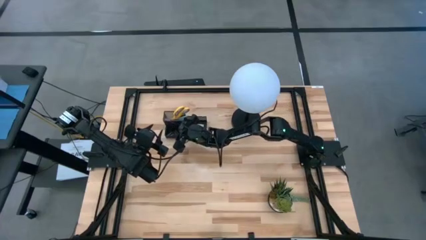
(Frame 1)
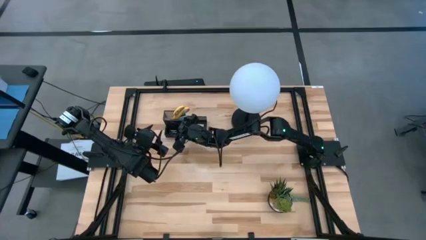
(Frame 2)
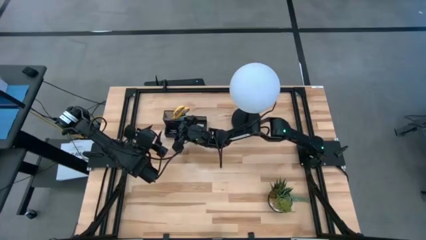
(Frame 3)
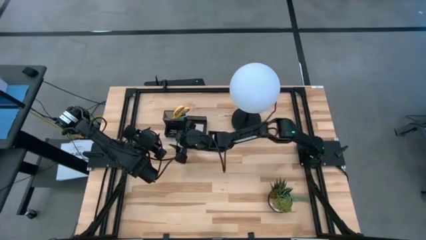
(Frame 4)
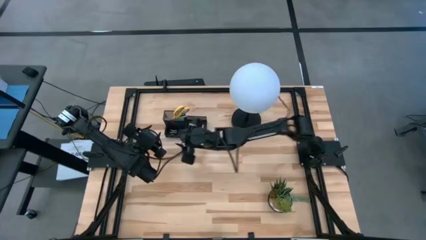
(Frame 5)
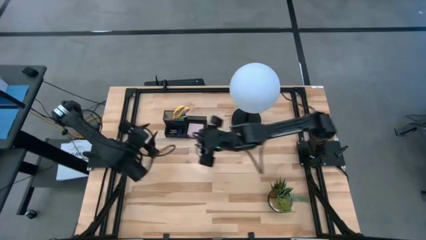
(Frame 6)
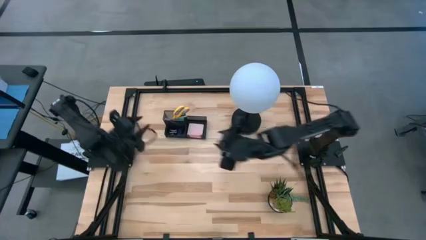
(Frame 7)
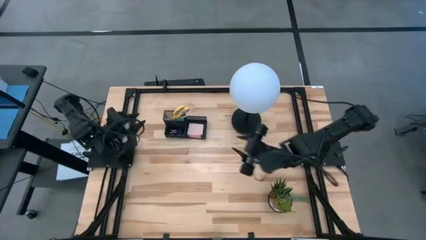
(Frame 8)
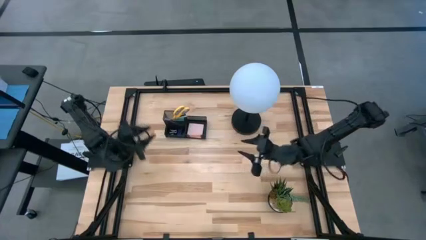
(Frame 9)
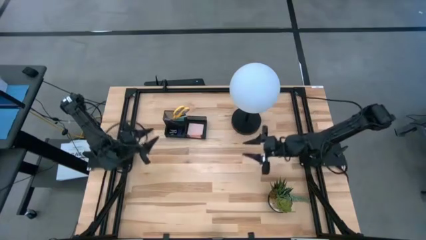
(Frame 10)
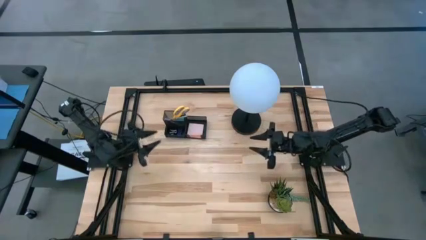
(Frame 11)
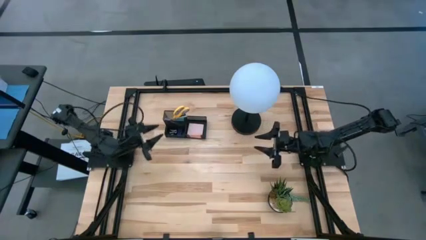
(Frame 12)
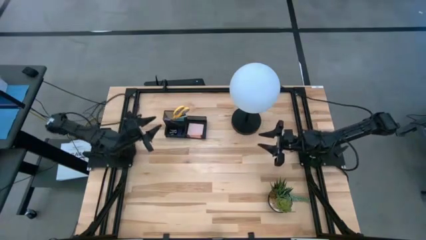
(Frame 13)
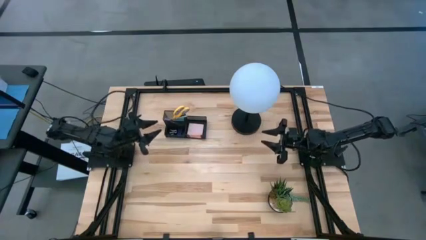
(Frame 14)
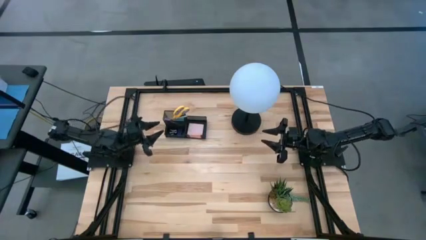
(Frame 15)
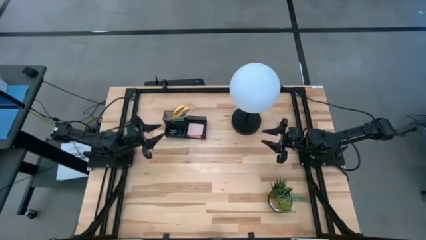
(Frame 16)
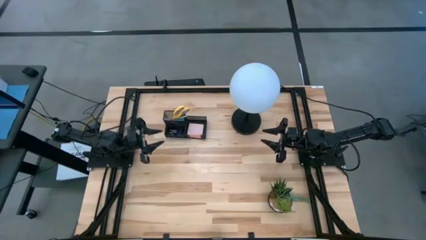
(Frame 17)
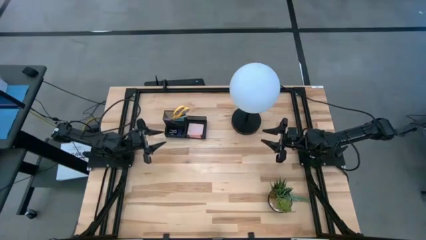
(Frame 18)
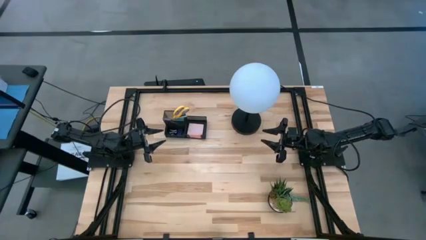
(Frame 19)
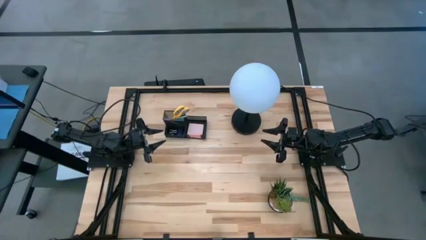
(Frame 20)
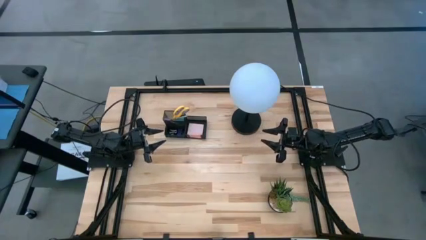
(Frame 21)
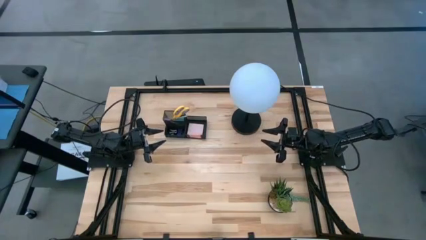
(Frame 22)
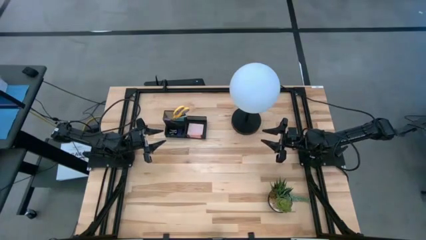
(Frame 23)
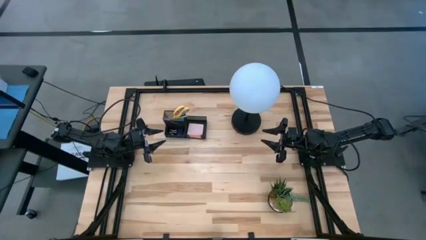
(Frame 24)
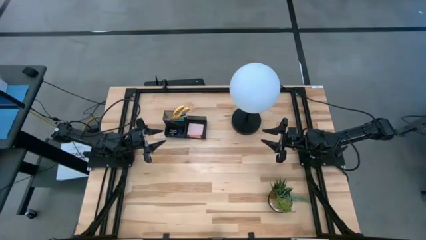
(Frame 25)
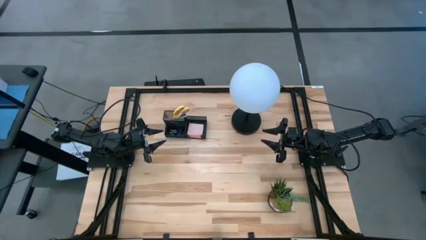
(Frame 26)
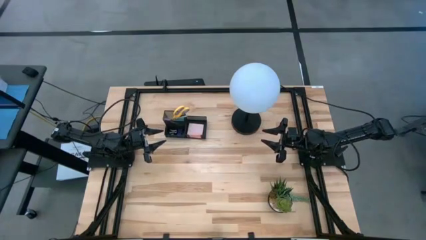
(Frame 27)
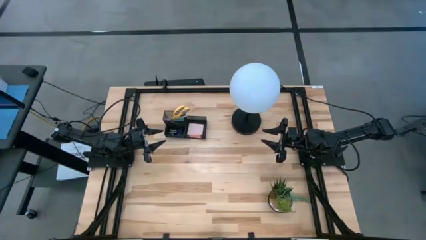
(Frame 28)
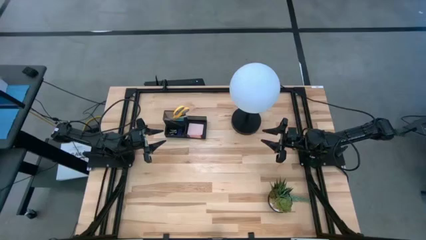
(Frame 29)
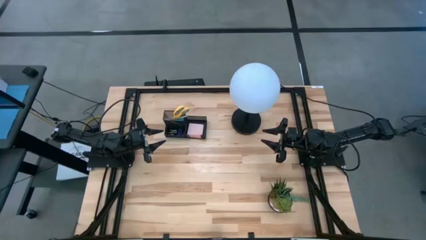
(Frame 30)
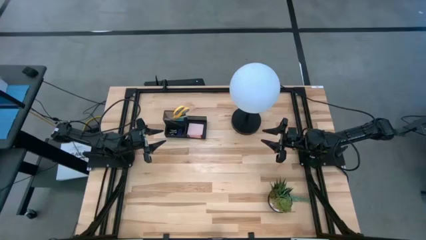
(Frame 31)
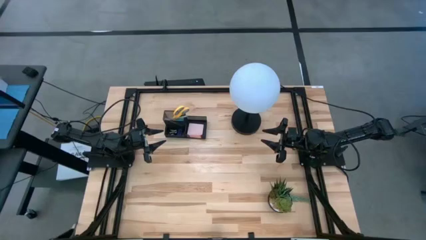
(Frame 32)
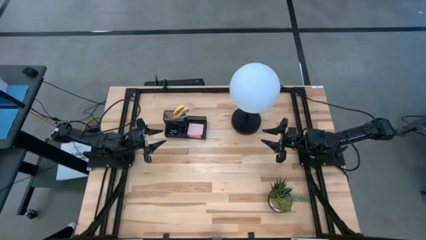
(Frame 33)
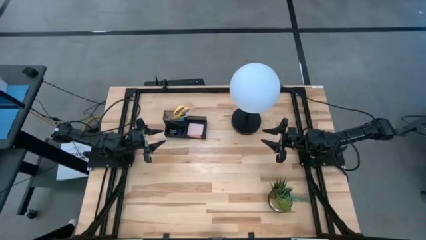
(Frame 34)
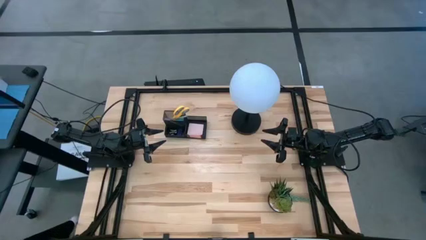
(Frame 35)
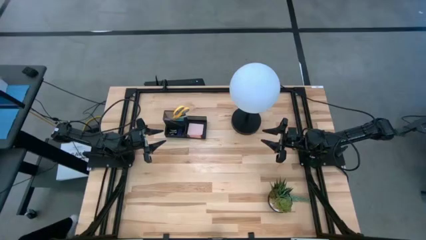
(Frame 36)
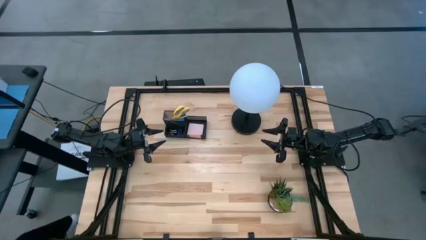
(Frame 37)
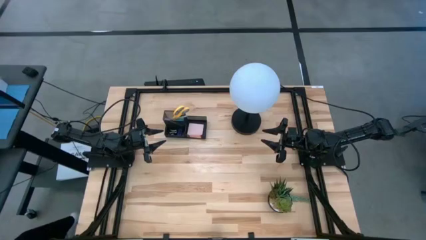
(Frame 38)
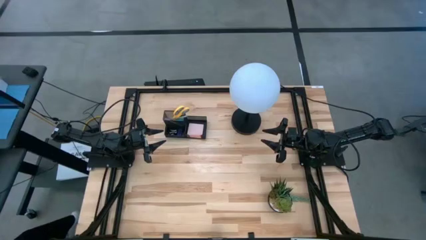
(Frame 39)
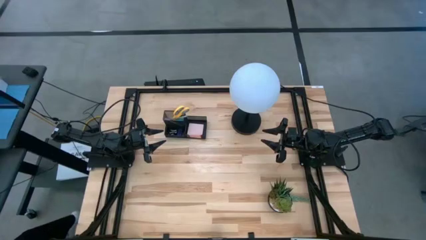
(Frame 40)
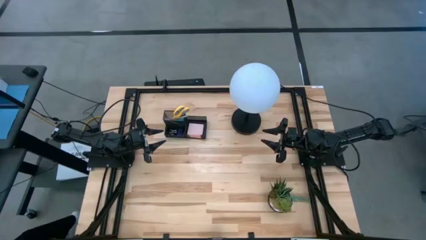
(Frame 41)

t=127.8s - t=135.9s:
Task: Pick and place office supplies into organizer
Return to Home Position

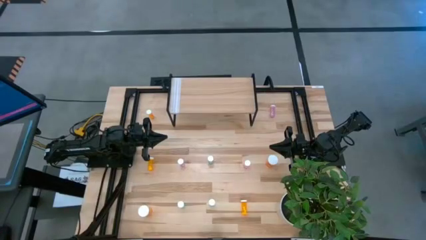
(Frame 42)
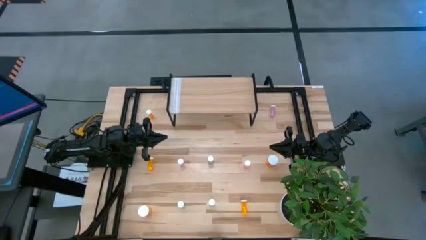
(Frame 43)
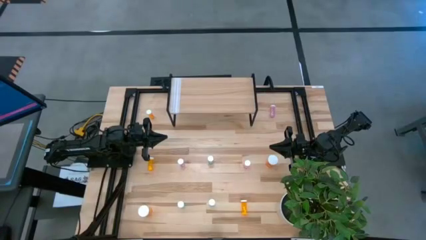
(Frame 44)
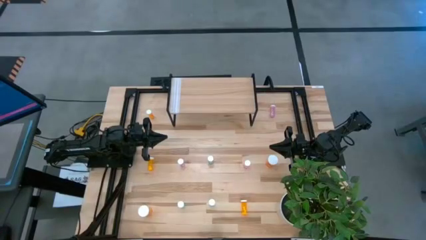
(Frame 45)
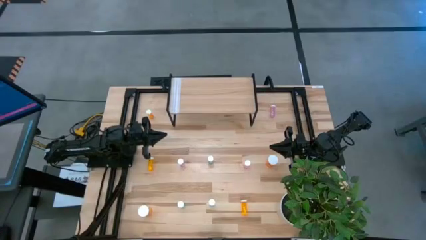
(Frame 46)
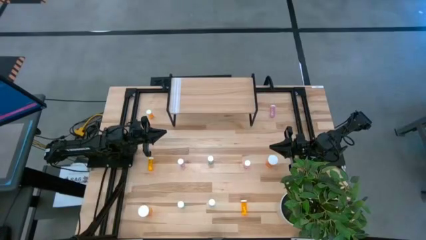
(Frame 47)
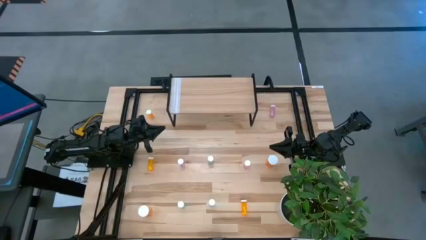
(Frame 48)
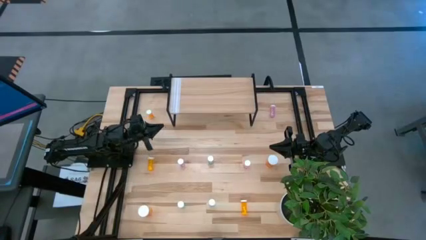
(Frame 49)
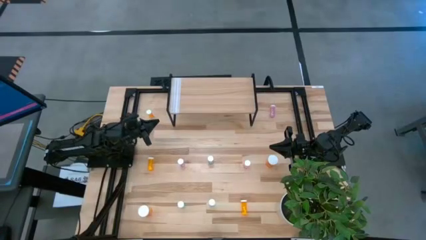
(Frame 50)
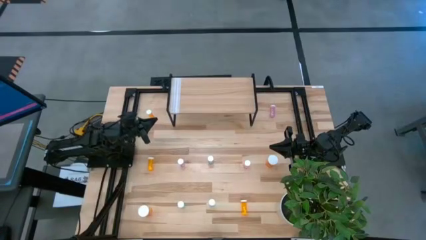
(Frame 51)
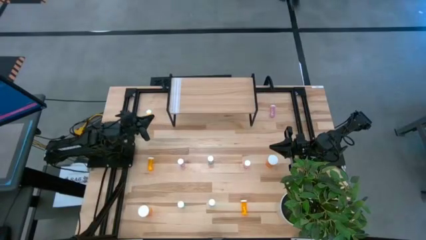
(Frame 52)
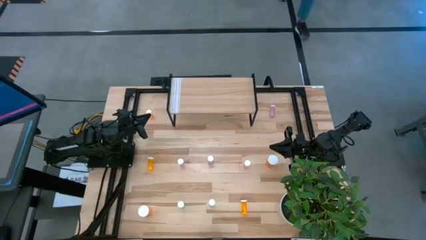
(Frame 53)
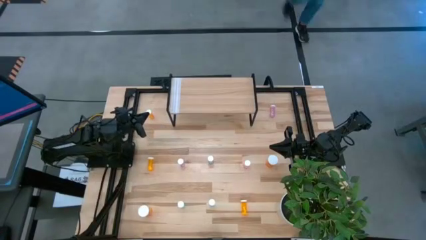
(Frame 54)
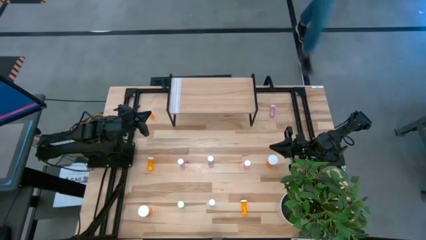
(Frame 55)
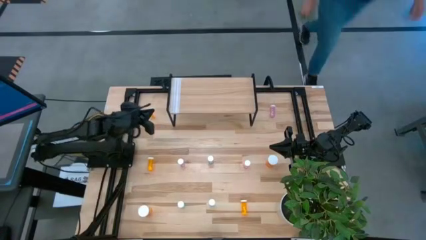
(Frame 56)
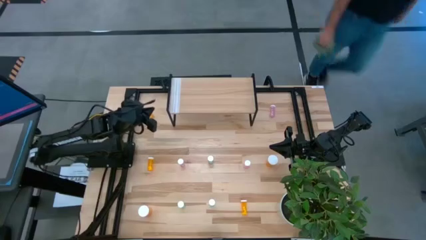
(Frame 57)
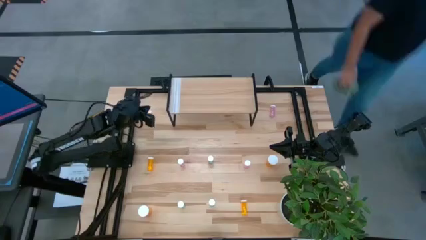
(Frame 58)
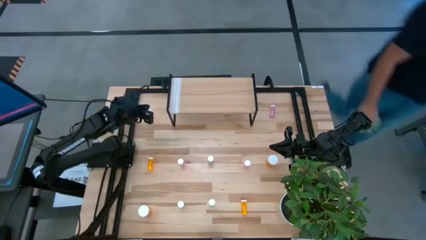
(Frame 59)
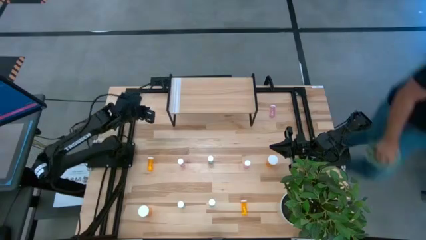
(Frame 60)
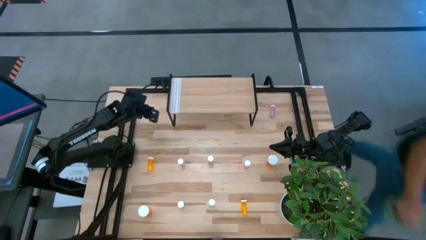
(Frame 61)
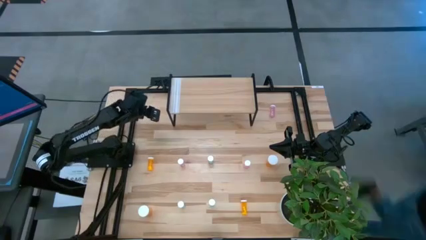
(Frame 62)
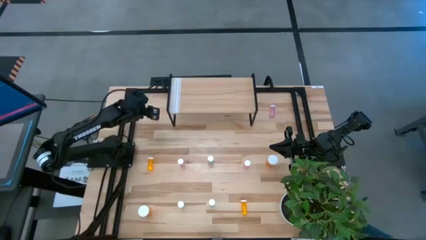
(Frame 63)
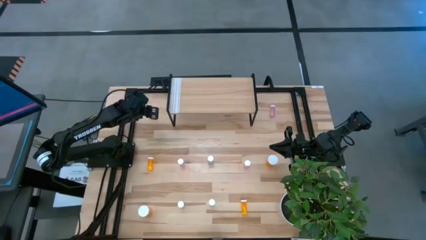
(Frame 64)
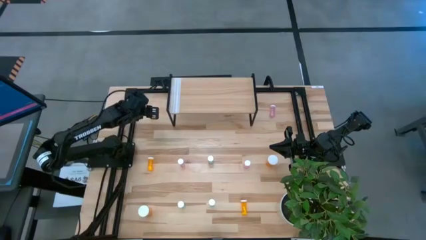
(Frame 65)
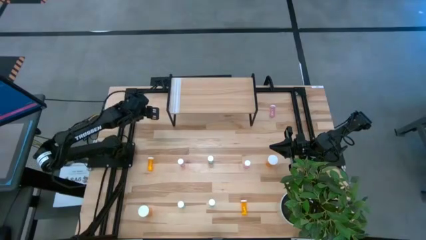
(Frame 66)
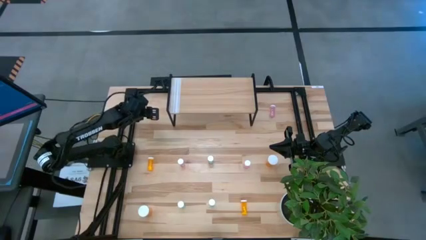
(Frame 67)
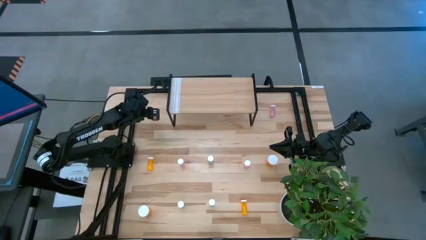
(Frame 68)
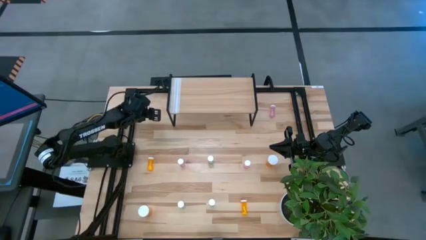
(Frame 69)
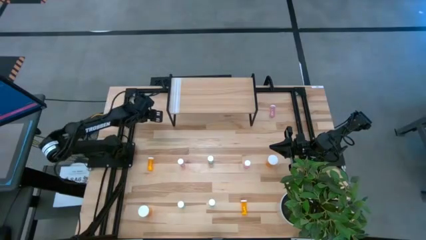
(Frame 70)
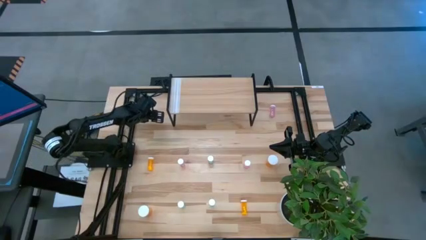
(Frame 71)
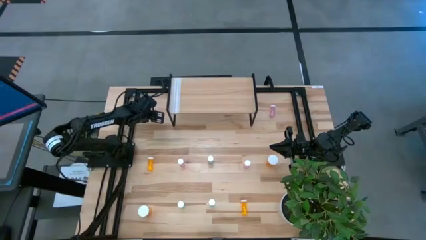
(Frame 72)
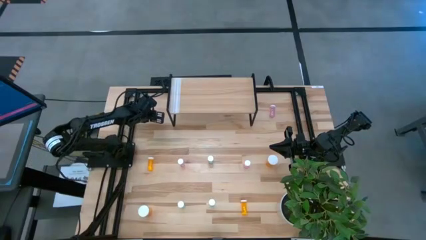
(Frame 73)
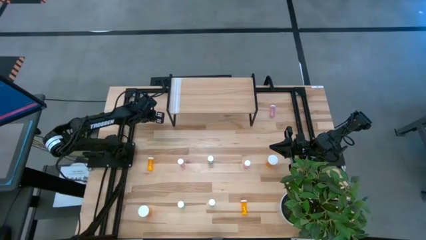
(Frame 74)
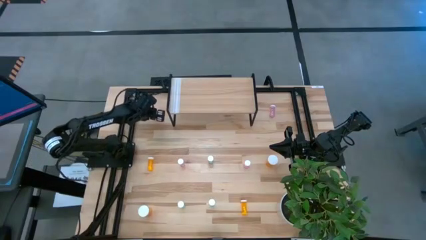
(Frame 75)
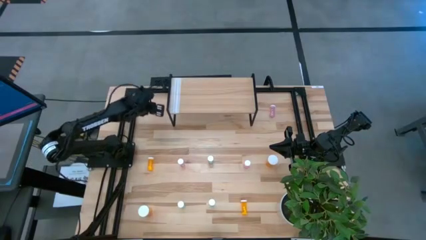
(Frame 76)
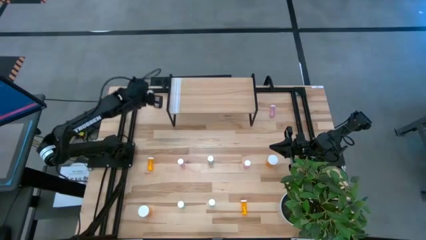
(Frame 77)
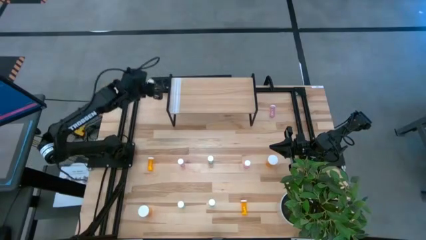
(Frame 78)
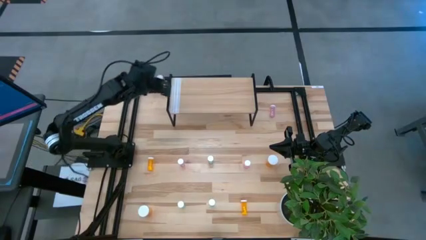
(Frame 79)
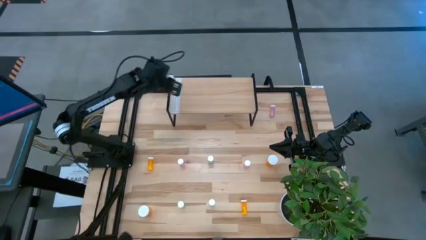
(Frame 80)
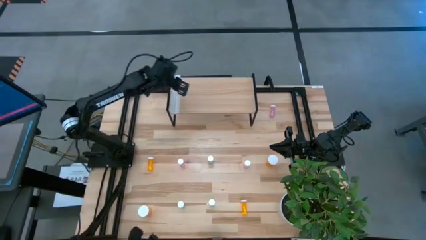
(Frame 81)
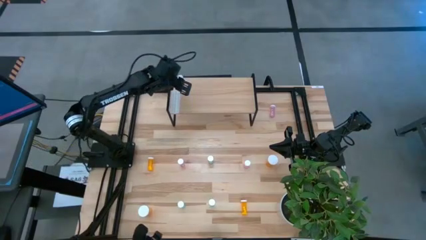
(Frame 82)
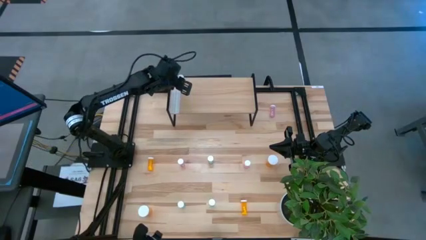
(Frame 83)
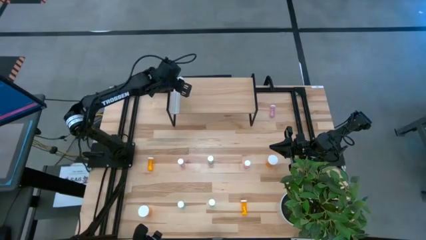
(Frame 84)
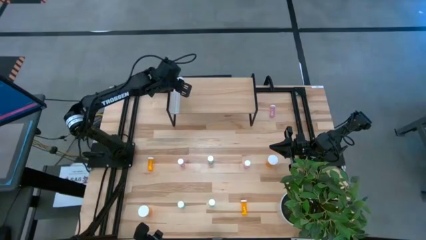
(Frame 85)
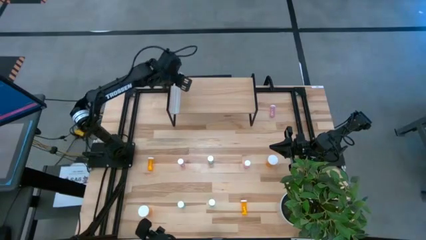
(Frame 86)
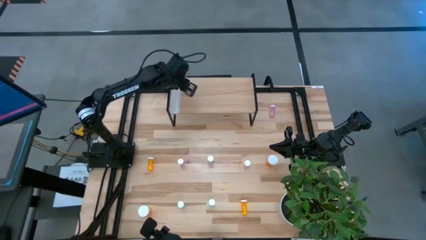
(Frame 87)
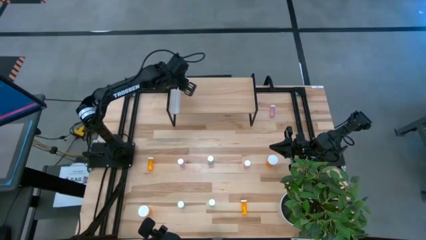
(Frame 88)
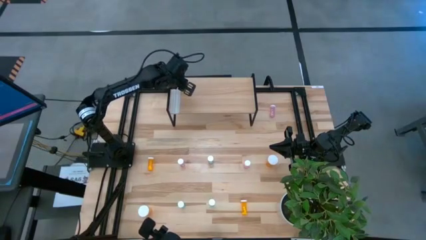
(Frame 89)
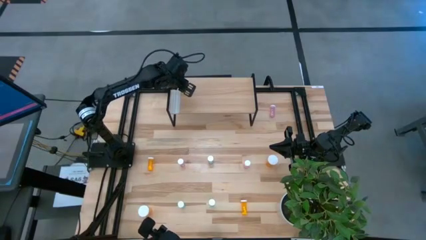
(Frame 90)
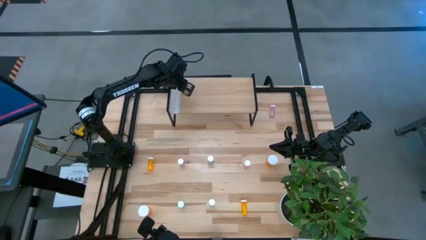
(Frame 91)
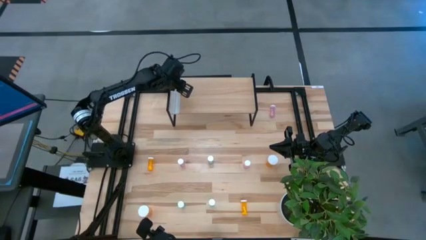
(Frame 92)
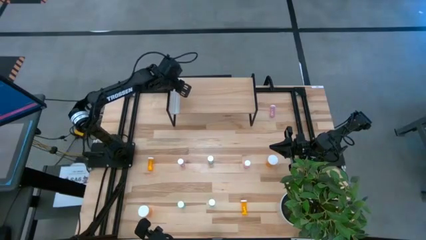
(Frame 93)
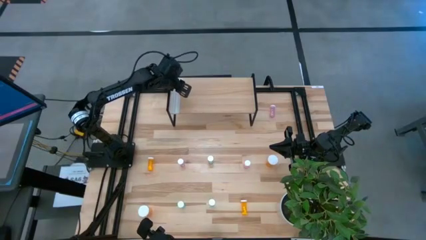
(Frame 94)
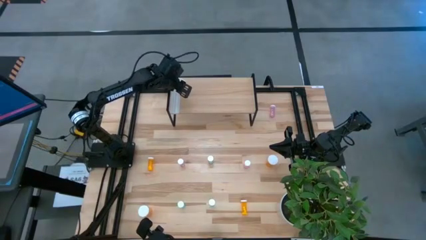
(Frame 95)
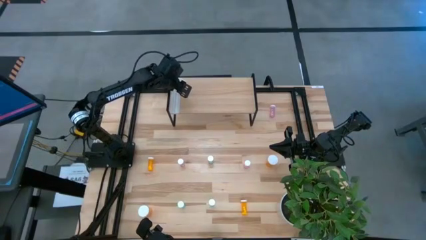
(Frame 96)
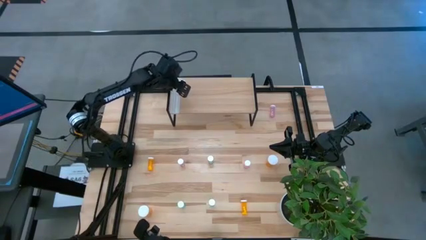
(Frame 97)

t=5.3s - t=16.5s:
Task: Pick and place medicine bottles onto shelf by color
Put the top small orange pill bottle on the shelf
